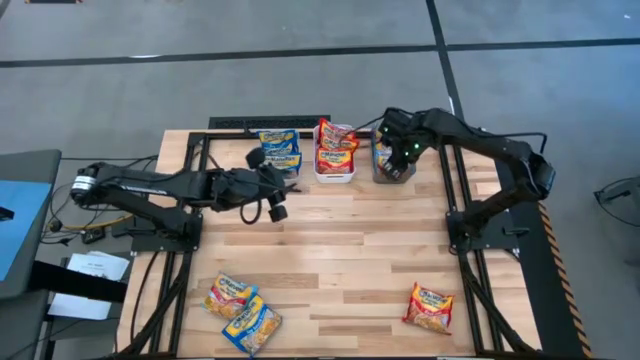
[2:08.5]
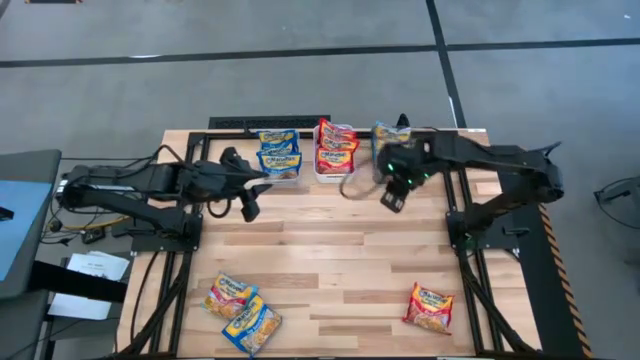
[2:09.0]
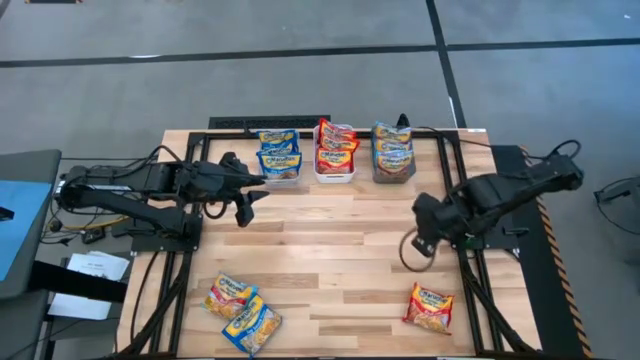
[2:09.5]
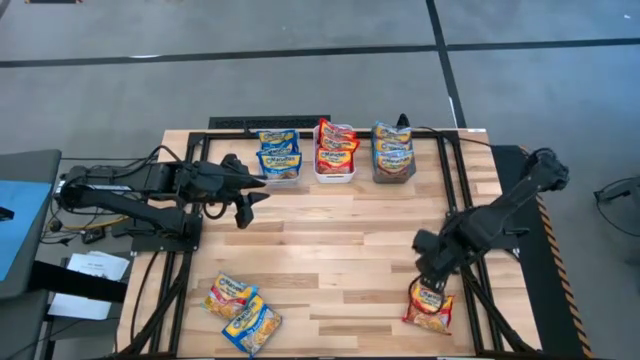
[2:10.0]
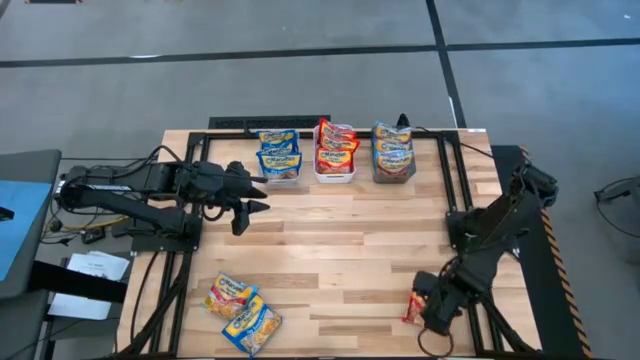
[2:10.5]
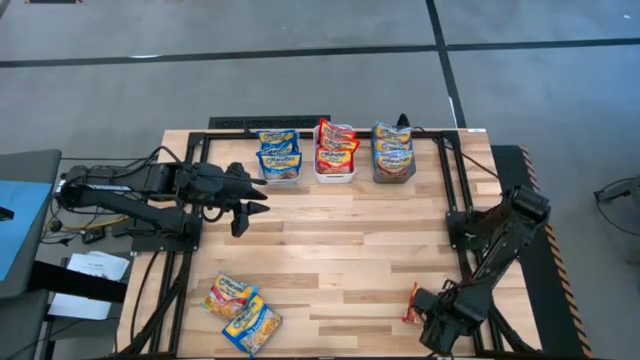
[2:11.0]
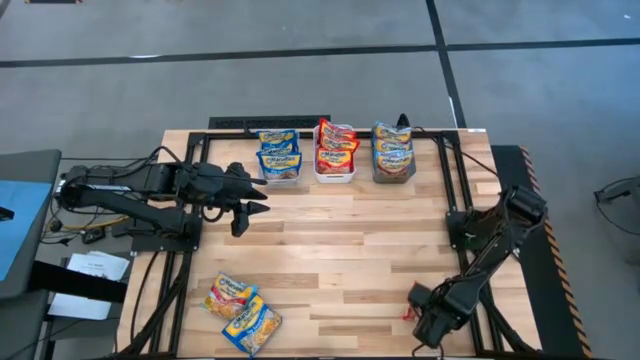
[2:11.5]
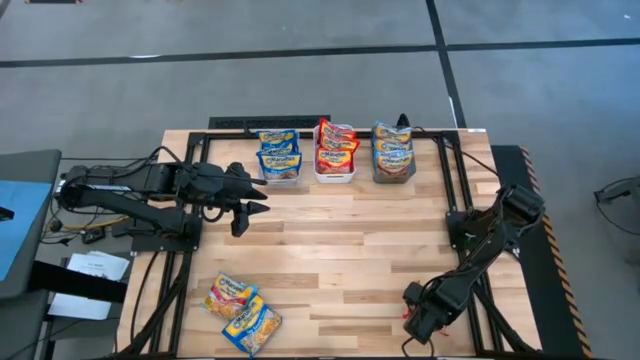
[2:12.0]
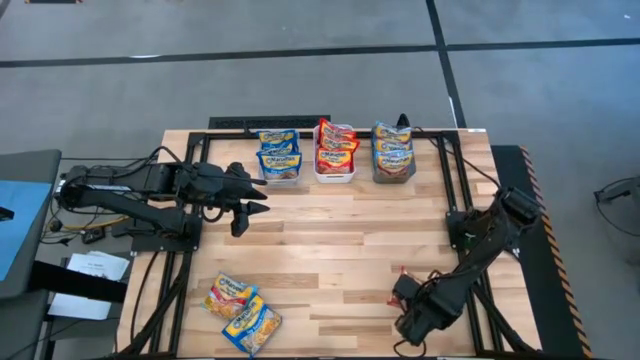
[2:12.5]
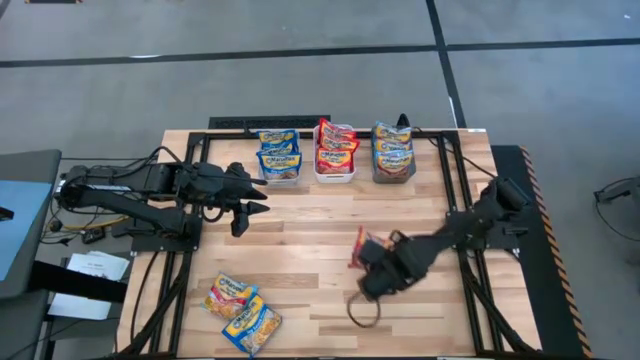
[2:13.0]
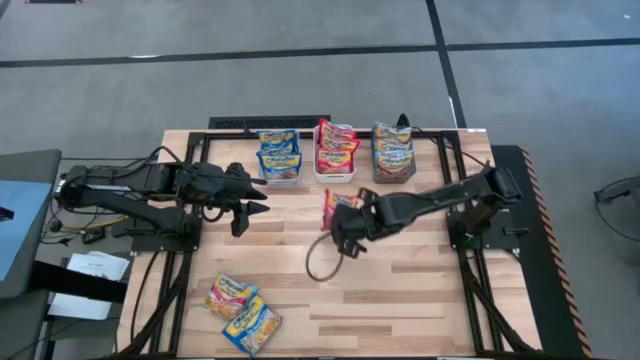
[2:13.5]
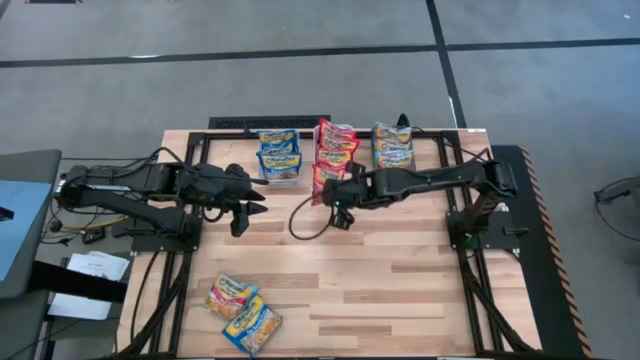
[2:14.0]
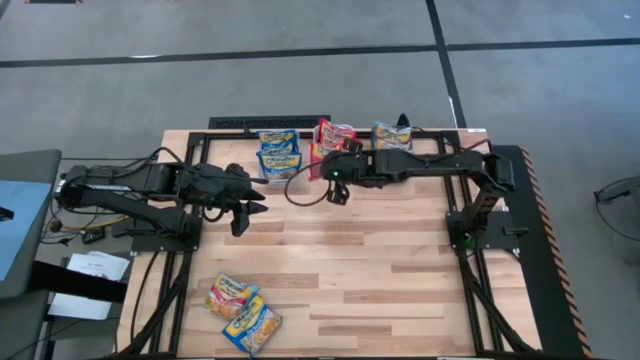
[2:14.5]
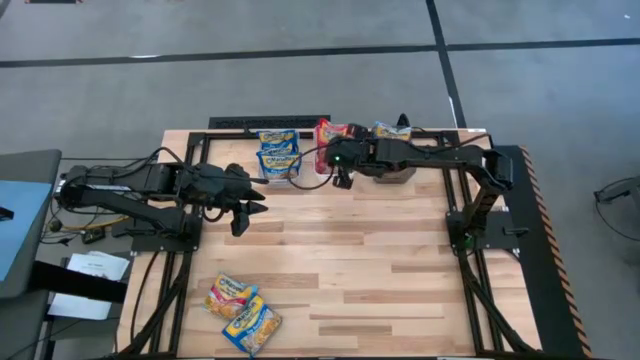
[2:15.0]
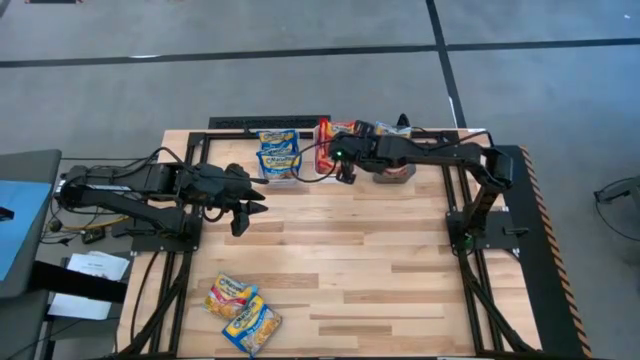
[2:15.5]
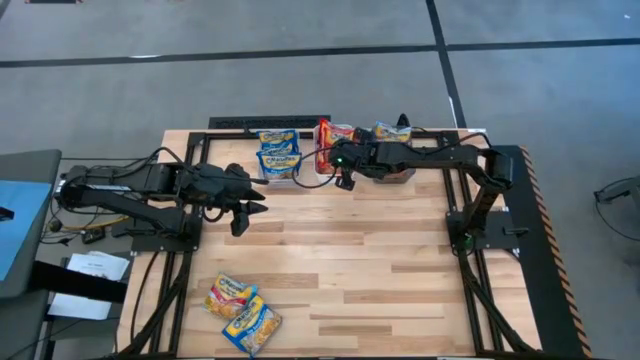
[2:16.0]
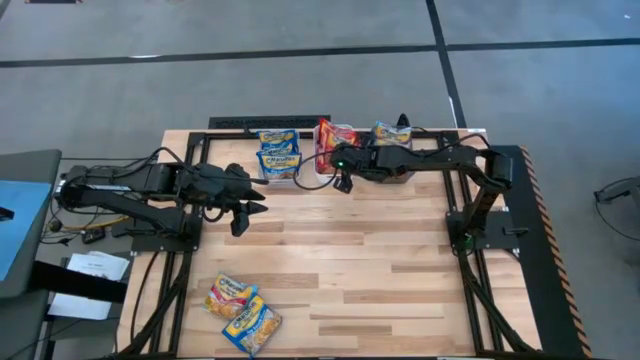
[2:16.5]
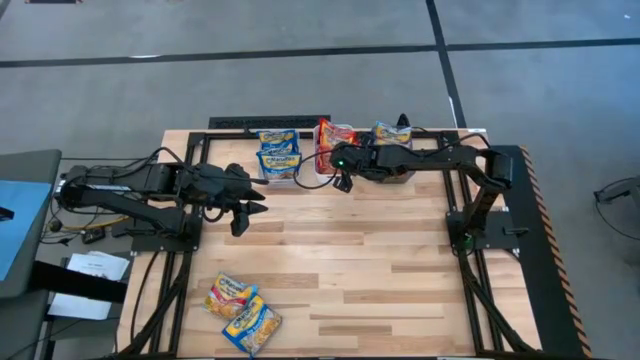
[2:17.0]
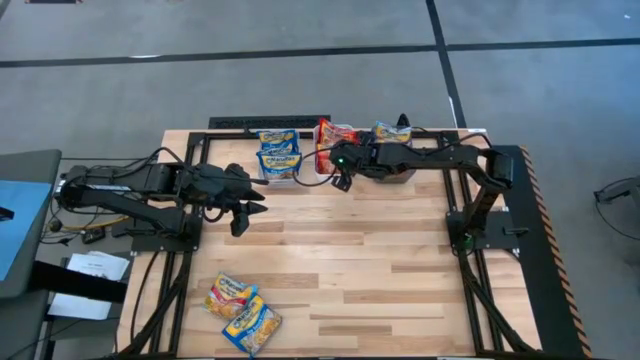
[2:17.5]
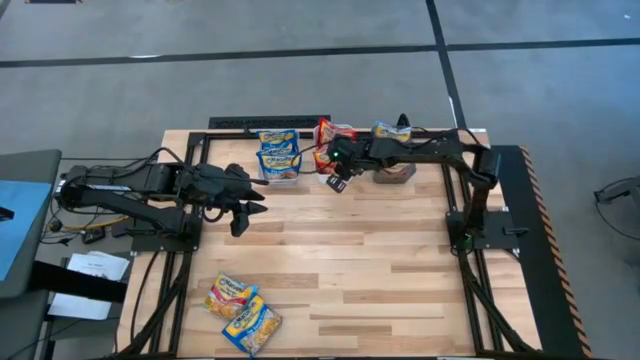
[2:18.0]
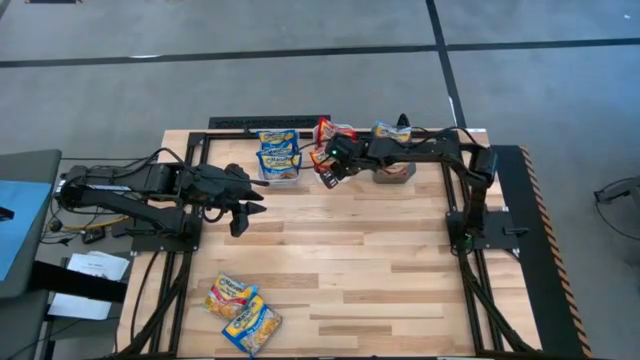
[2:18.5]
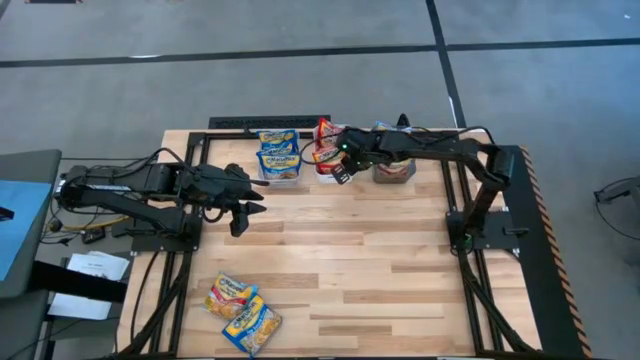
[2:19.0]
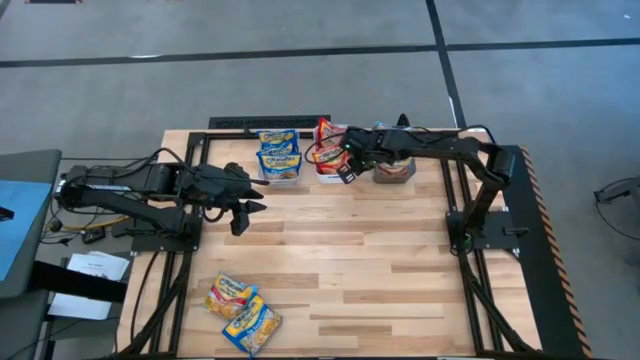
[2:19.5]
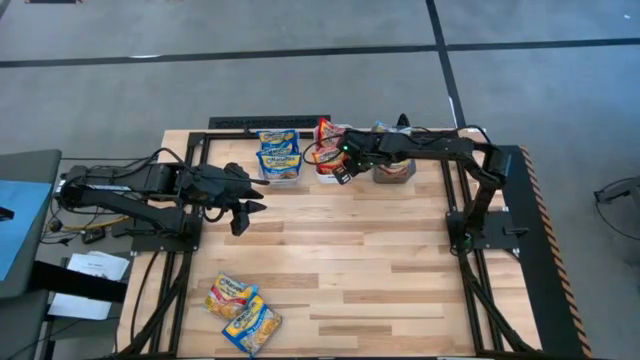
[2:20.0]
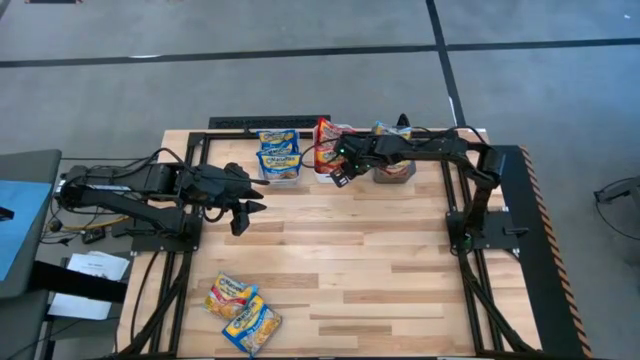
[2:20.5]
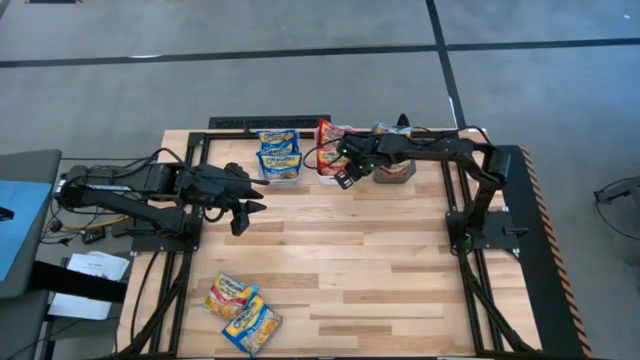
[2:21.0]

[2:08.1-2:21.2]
Task: Sort Maruchan noodles
Put the red noodle pack into the white bin

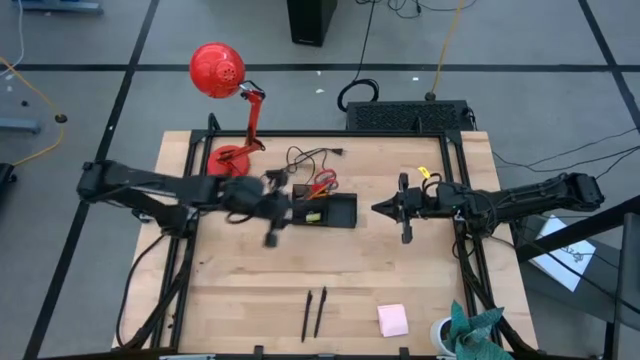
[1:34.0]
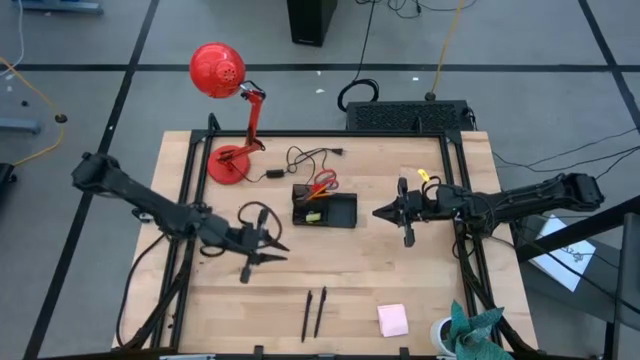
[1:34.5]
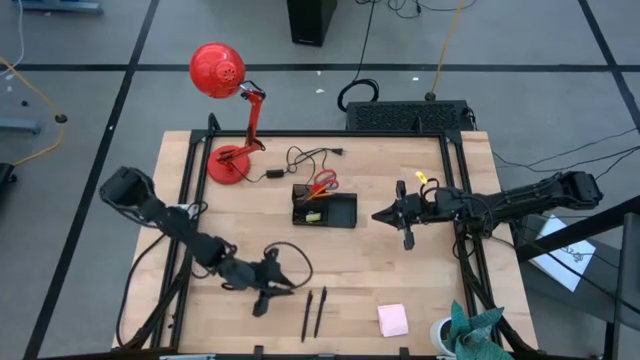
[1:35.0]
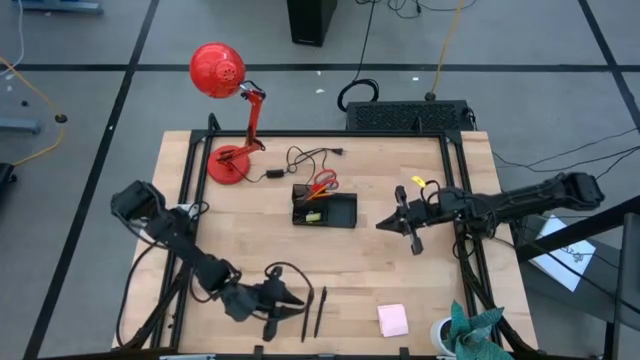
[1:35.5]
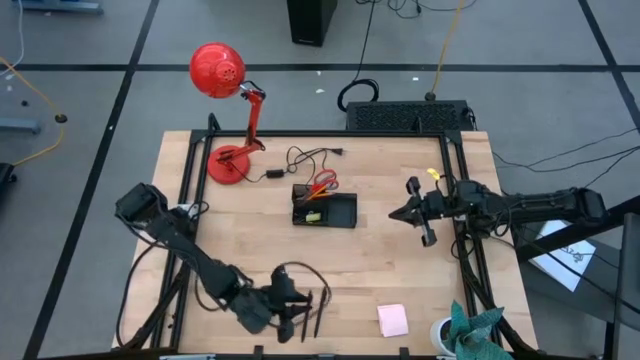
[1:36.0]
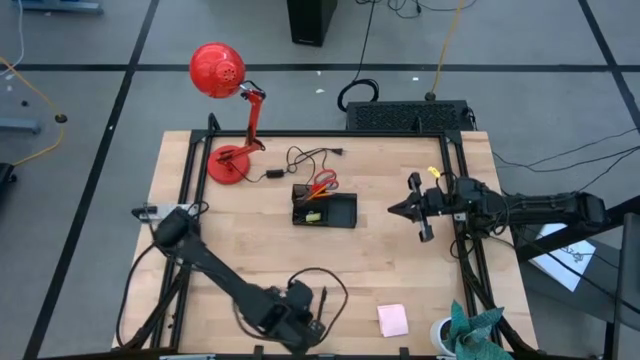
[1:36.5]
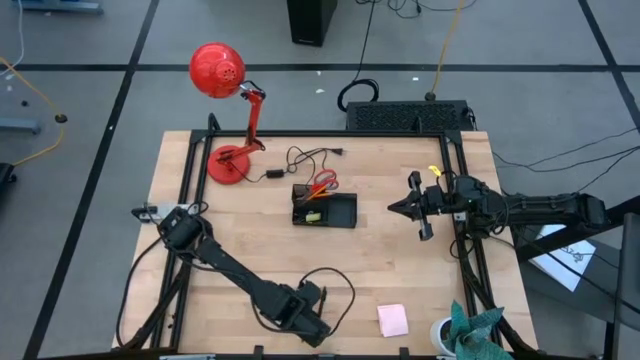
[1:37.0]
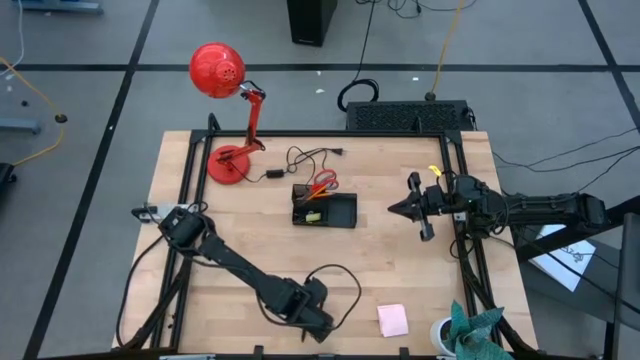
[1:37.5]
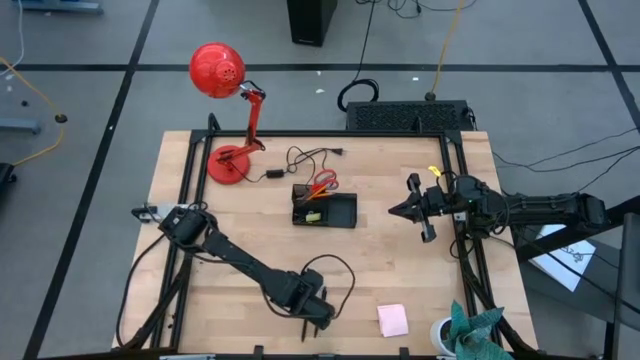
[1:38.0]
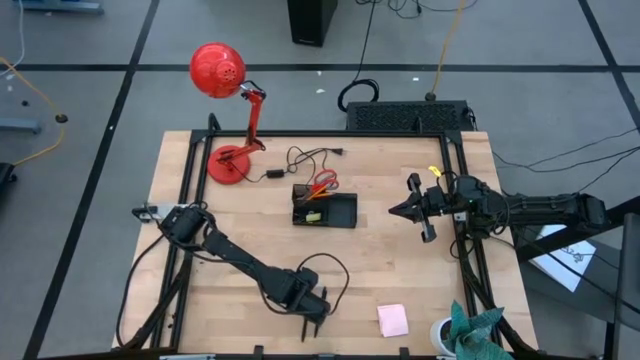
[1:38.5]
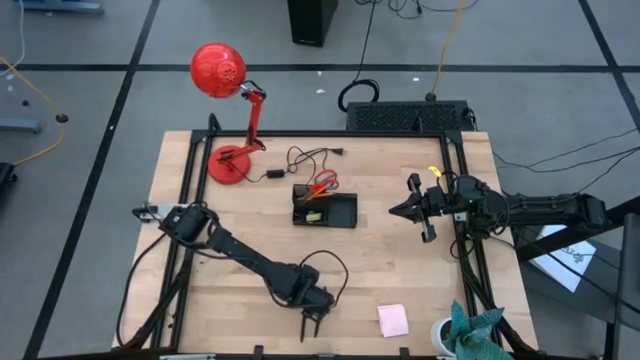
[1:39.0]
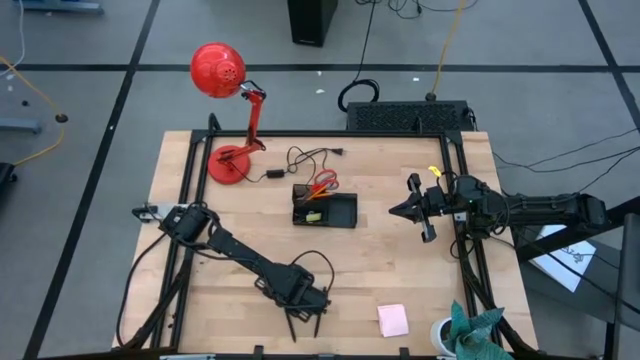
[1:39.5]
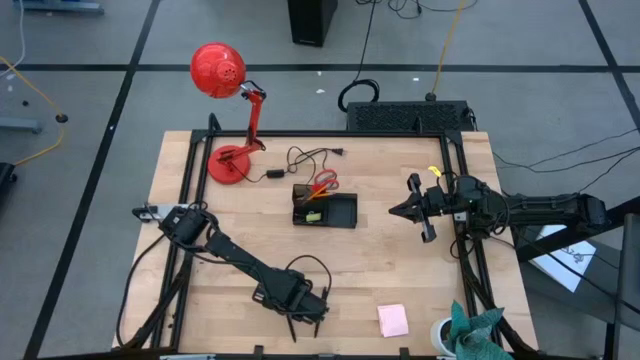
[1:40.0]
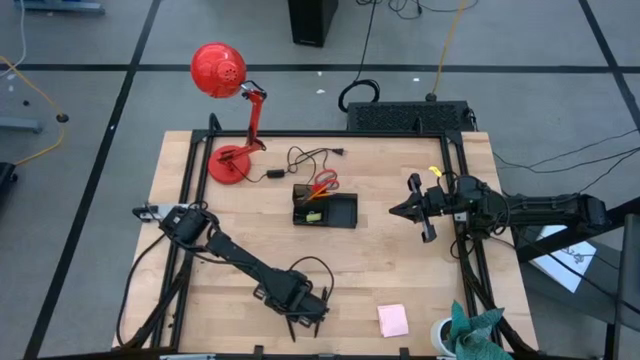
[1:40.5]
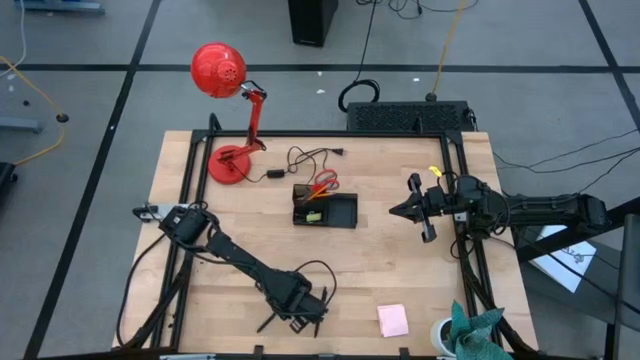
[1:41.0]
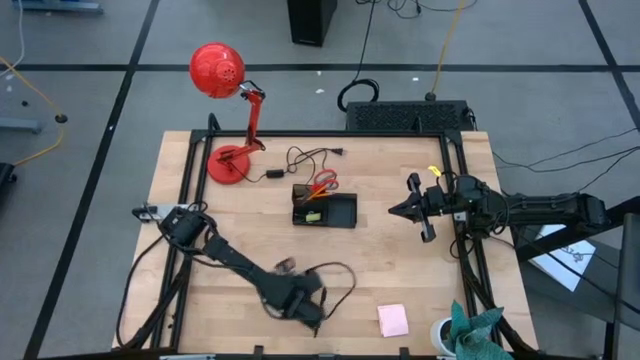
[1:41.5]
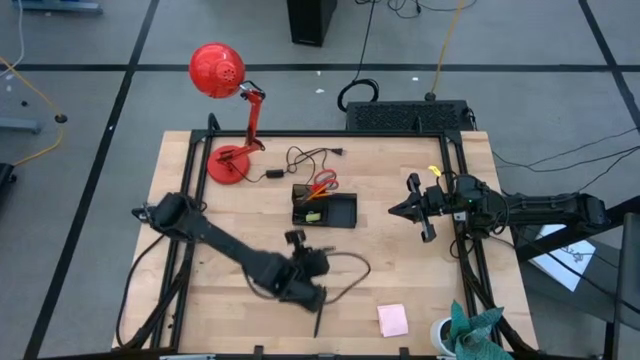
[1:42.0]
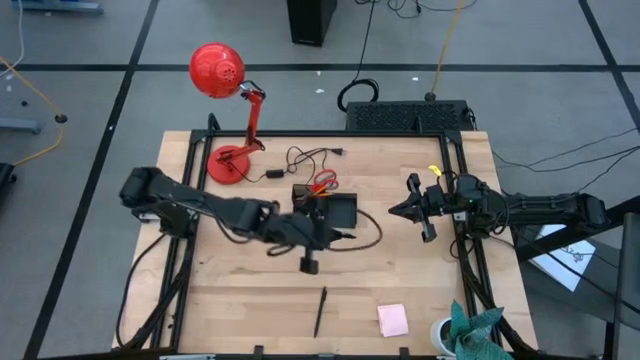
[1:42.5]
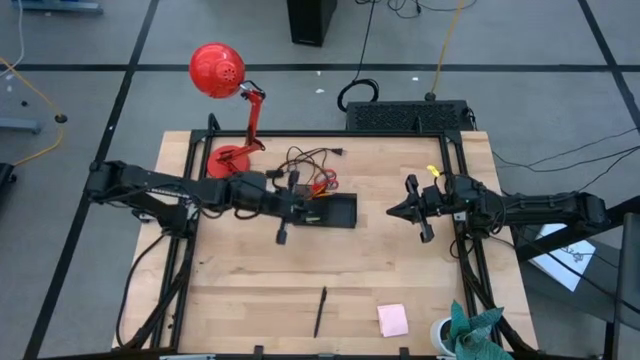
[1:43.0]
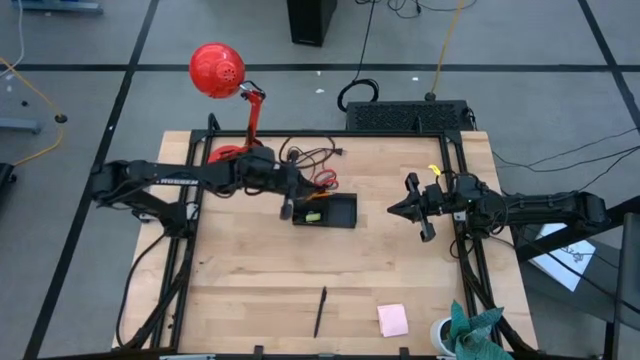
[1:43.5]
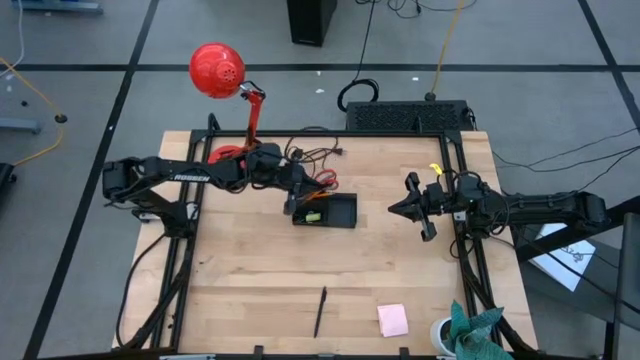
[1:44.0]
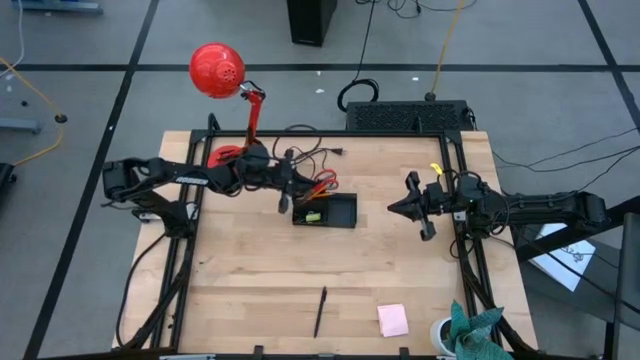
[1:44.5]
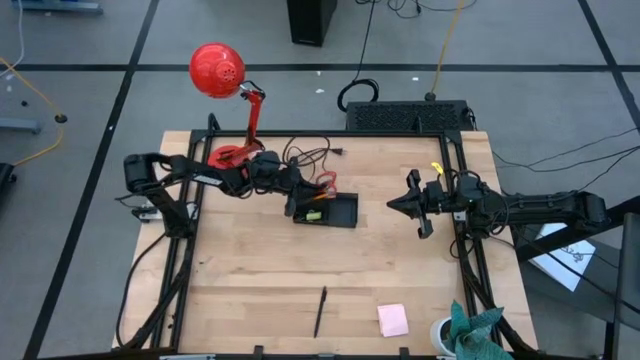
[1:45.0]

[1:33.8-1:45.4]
Task: Pick and place office supplies into organizer
Put the black ballpen into the black desk organizer
